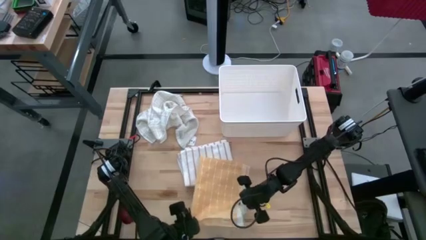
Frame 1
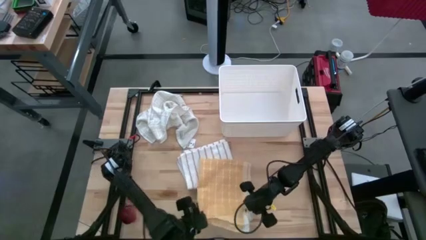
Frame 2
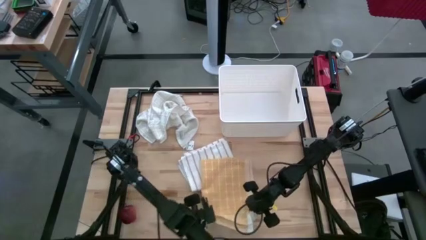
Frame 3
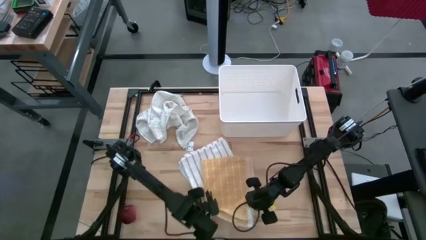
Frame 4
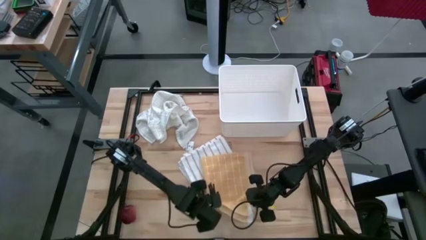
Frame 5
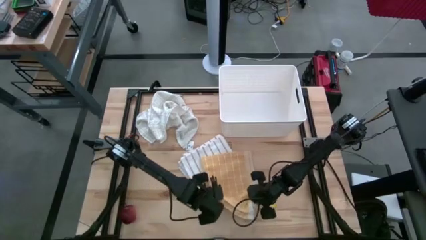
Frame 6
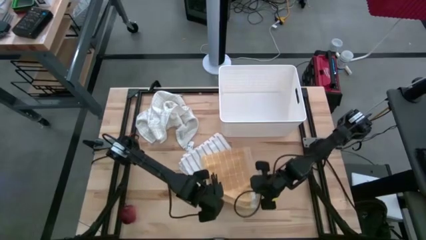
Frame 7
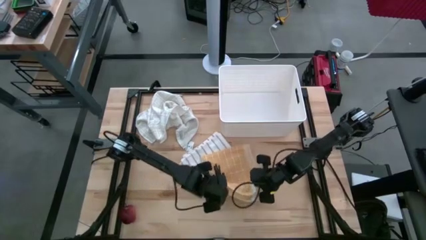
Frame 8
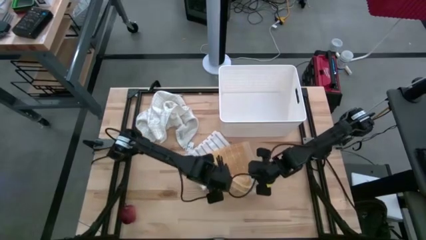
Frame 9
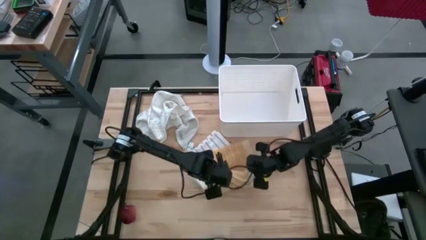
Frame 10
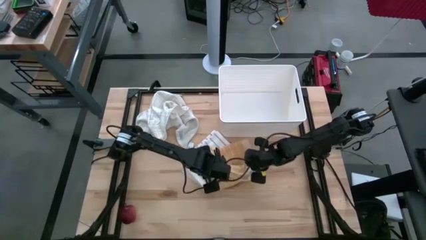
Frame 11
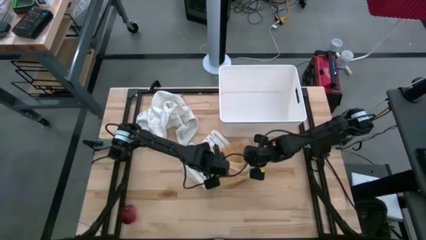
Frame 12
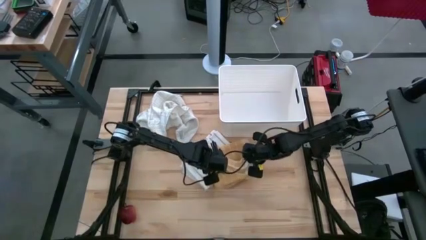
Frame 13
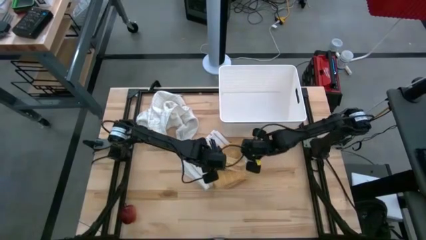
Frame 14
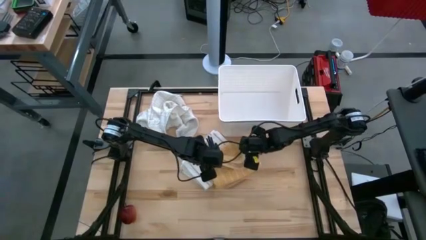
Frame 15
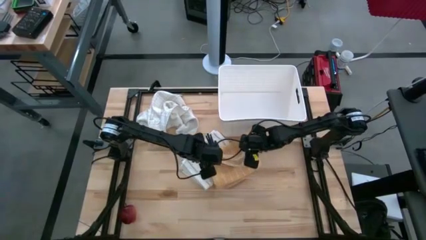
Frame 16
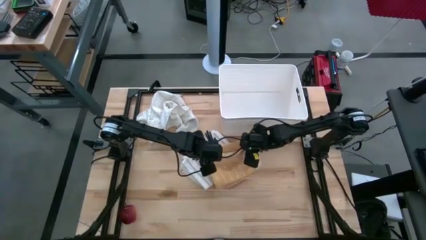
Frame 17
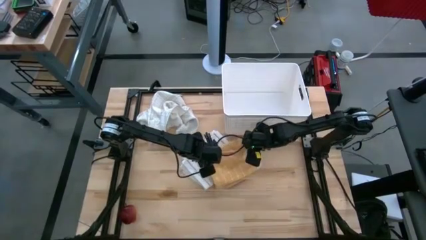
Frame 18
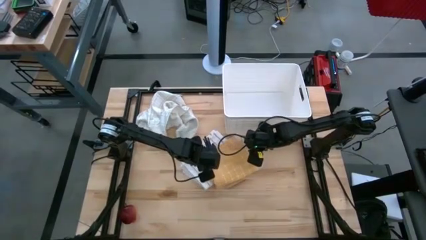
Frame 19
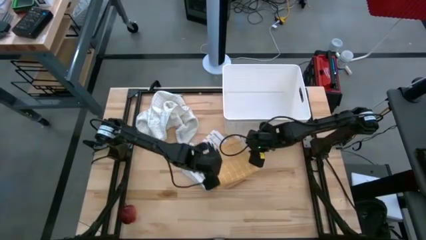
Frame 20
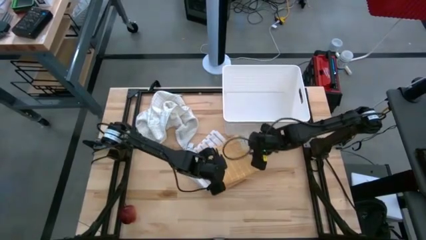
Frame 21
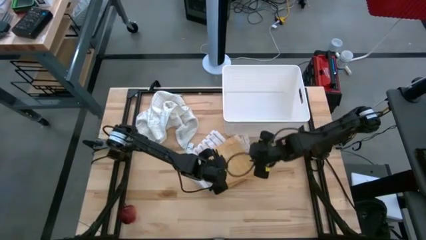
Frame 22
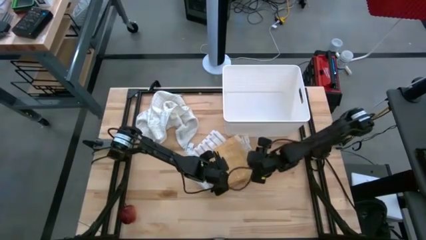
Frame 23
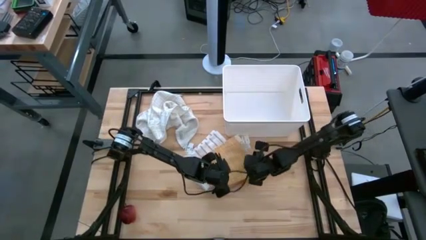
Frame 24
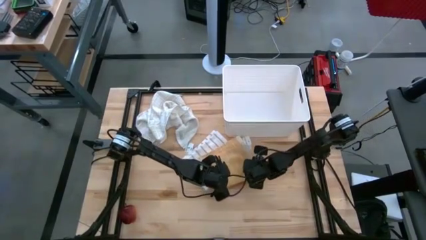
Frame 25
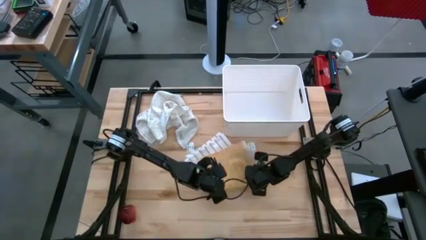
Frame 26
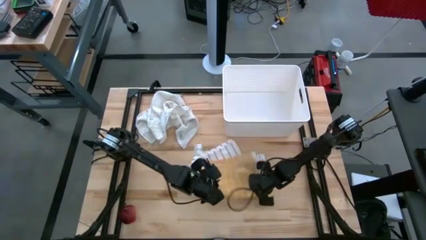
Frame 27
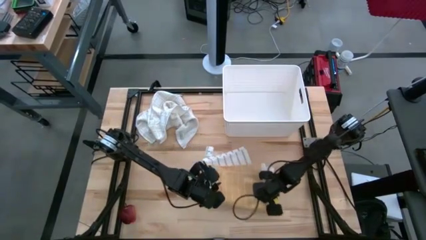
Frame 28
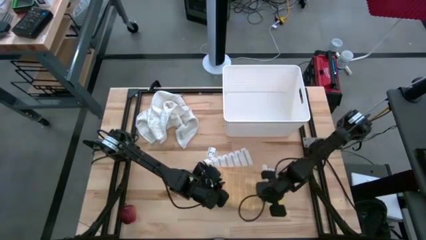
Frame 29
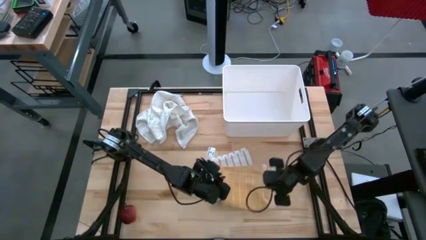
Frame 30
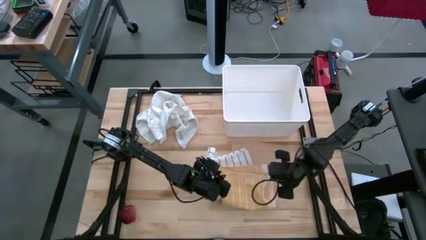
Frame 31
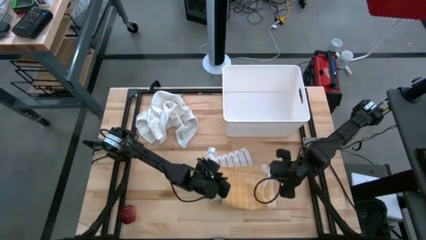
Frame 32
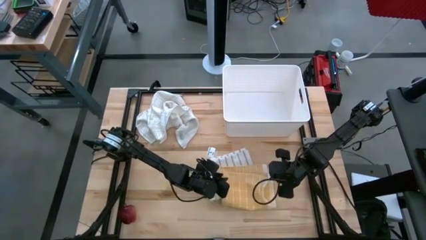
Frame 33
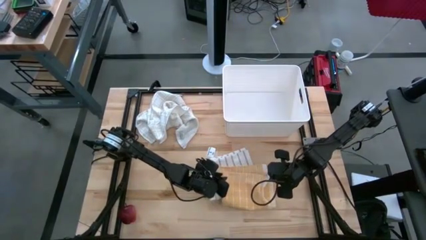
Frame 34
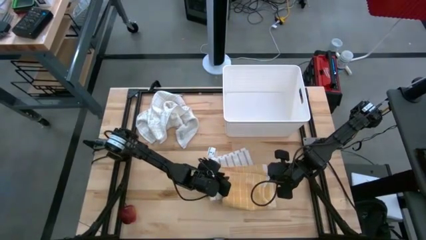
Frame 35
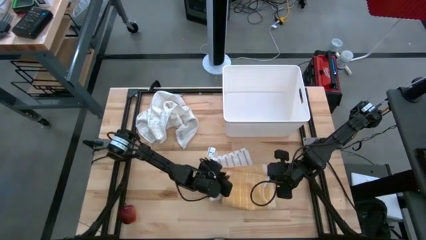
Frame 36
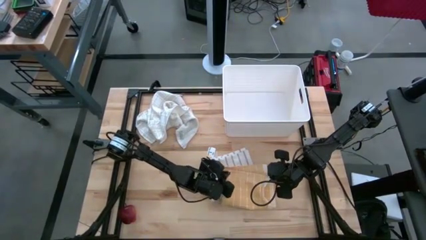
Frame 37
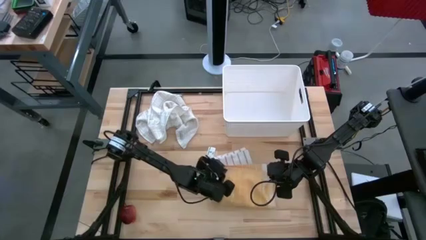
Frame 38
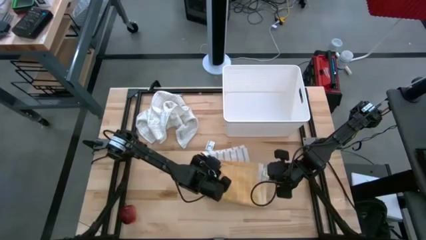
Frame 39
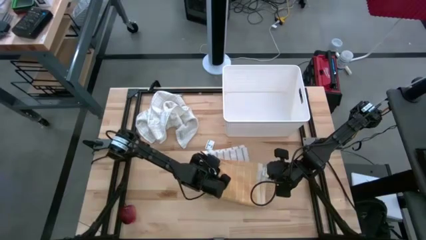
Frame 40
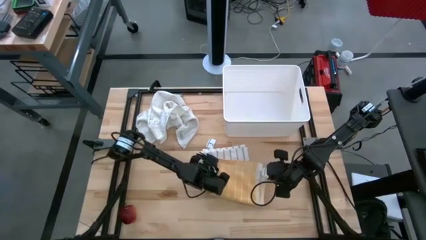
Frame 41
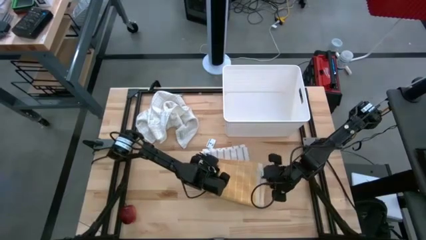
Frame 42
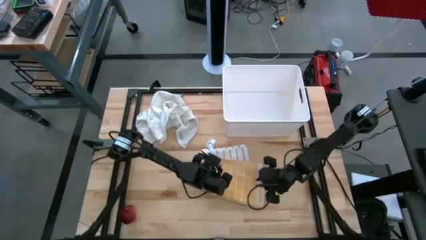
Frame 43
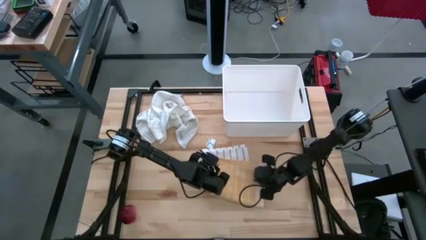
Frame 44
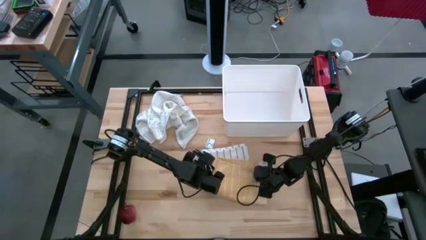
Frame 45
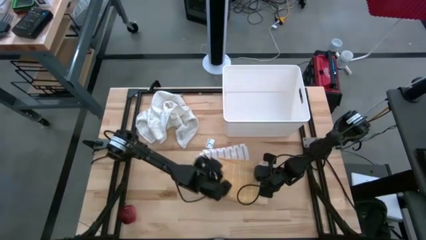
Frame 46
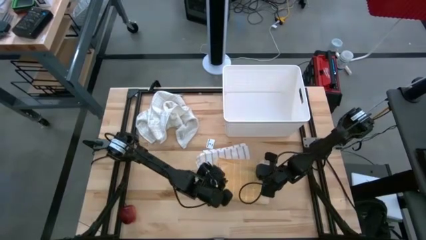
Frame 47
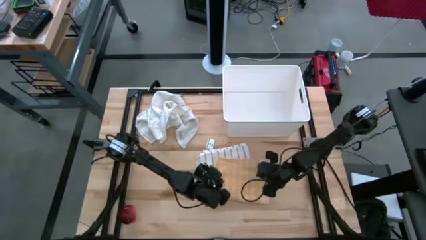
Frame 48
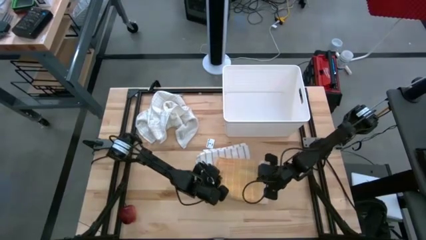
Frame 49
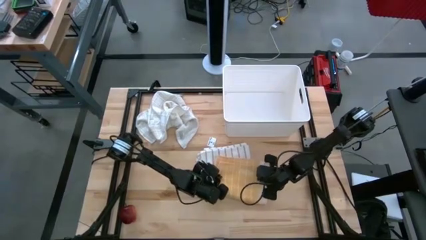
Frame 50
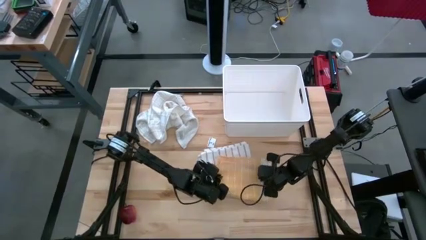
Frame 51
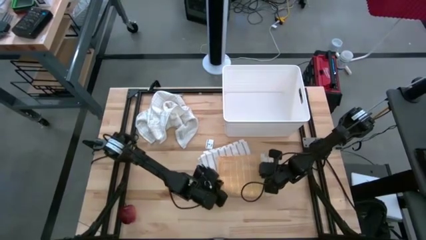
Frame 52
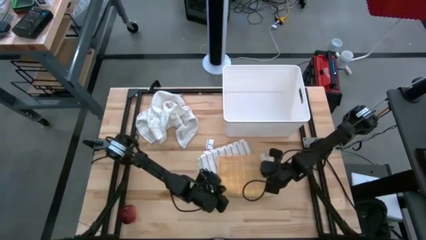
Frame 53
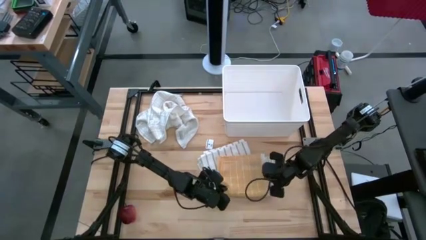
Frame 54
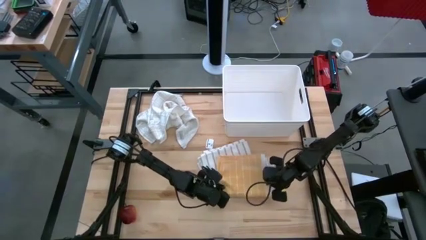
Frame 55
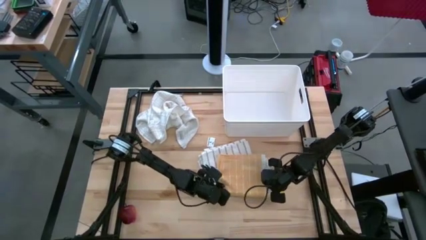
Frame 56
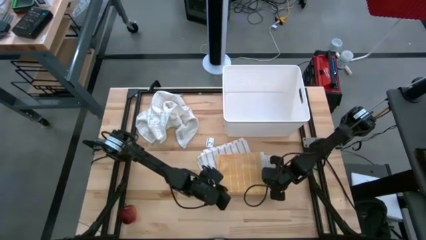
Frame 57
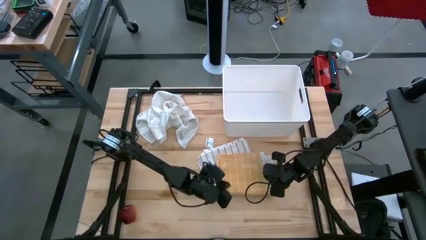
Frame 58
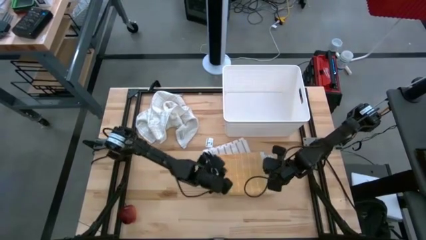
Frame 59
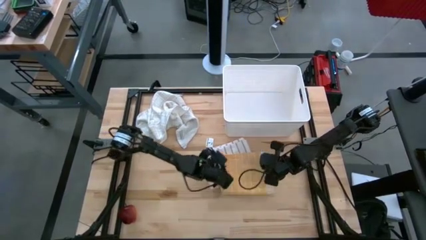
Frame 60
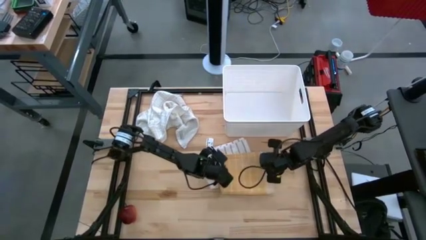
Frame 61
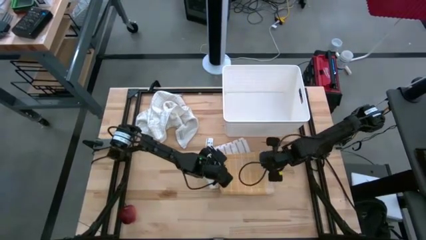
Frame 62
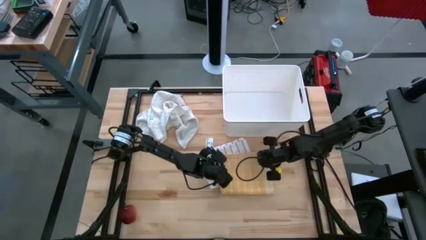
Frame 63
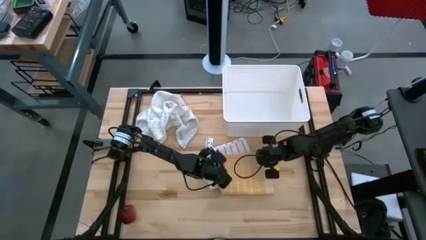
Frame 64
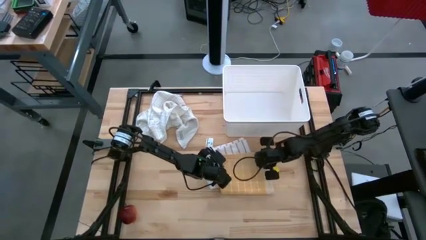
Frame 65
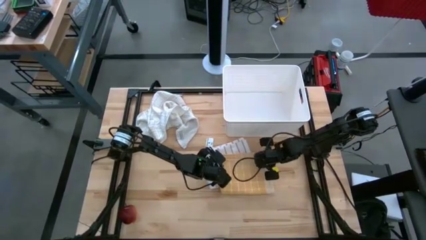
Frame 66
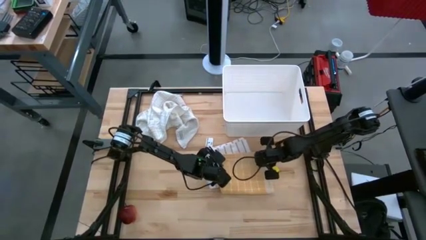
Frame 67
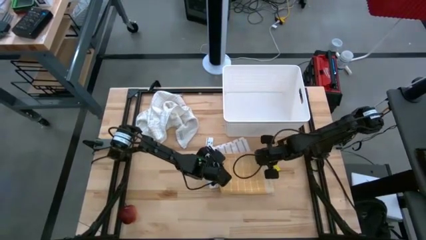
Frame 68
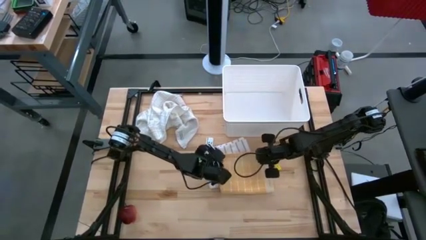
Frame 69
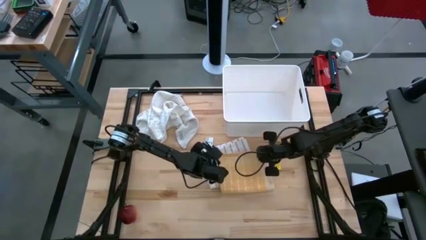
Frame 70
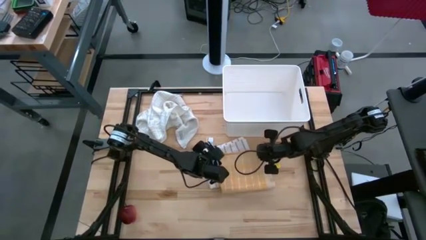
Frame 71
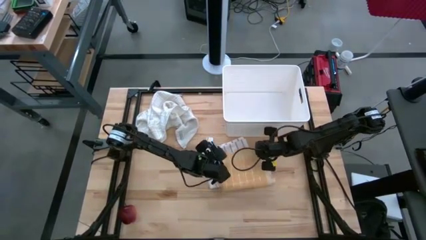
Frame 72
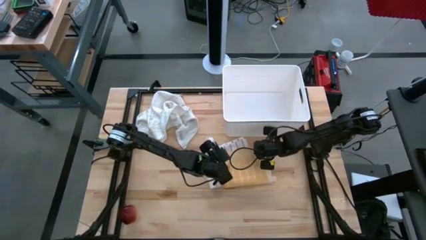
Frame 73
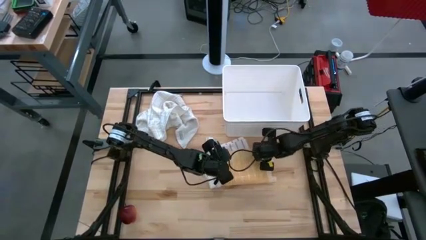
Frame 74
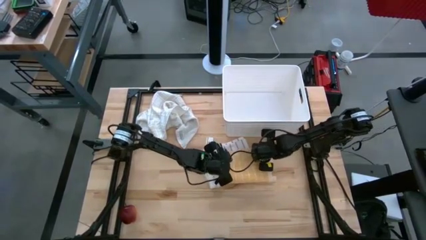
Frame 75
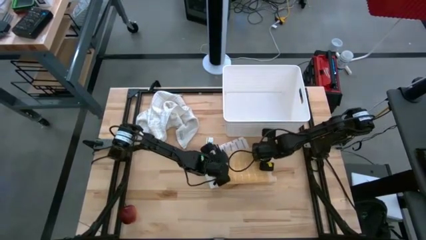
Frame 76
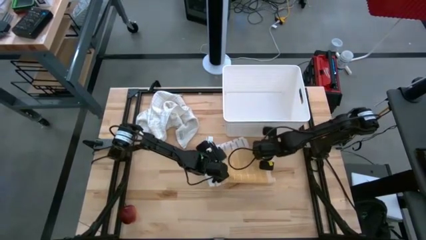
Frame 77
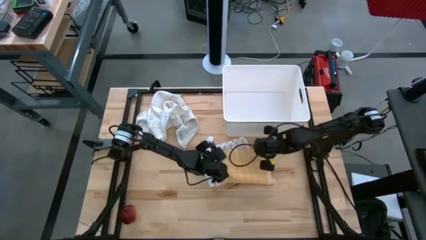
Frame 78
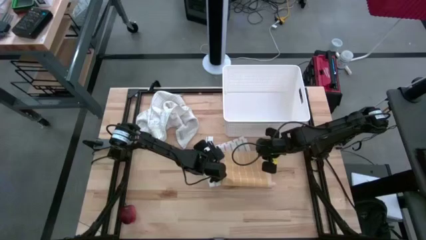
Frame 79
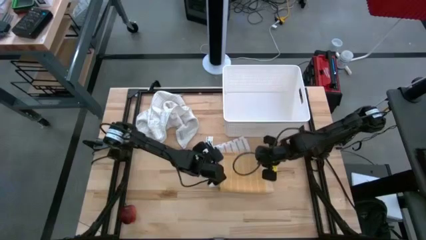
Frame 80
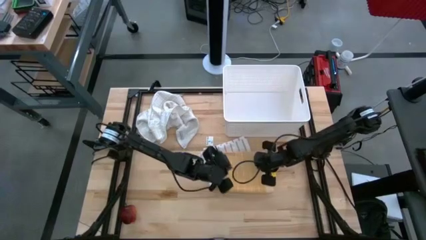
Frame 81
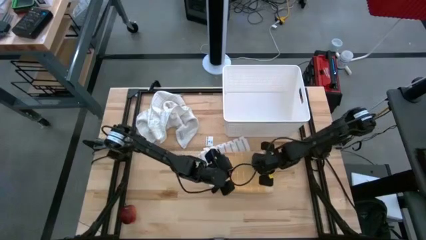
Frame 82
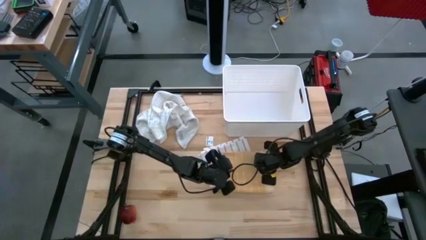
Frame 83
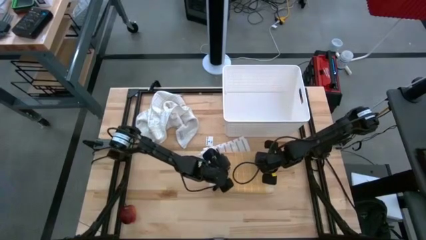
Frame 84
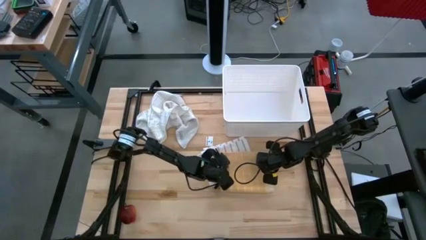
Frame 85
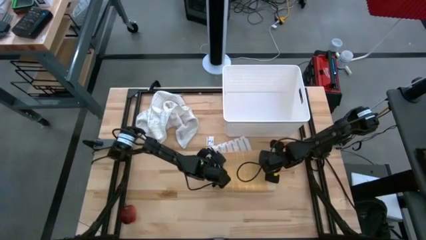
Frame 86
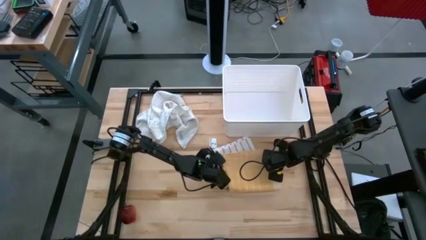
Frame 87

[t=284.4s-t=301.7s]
Task: Fold towel
Fold the yellow squared towel
